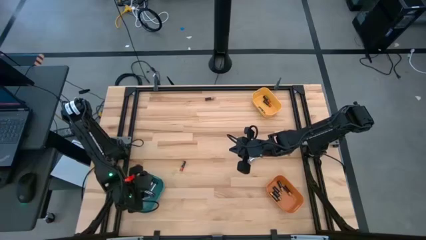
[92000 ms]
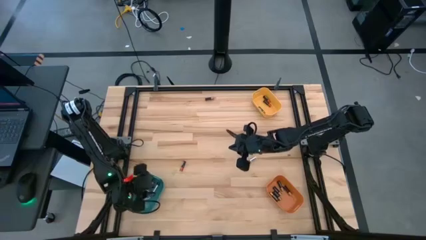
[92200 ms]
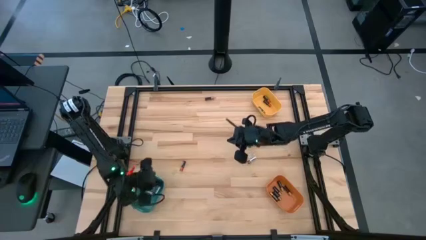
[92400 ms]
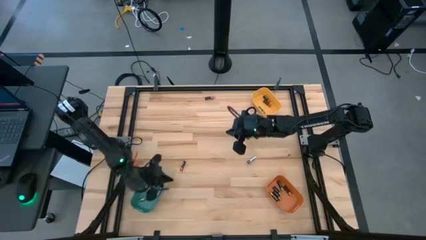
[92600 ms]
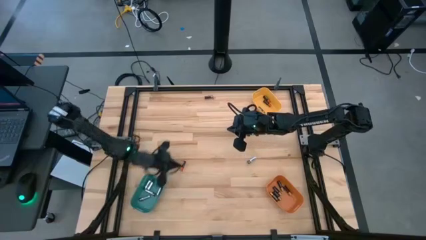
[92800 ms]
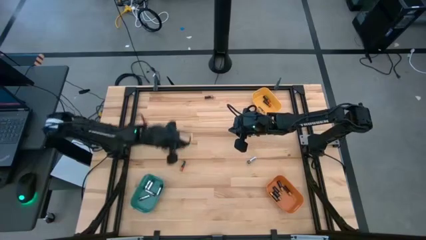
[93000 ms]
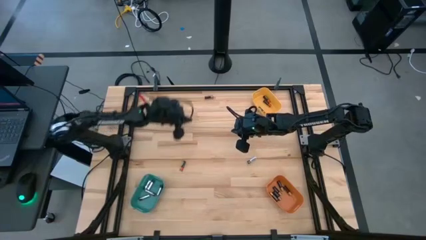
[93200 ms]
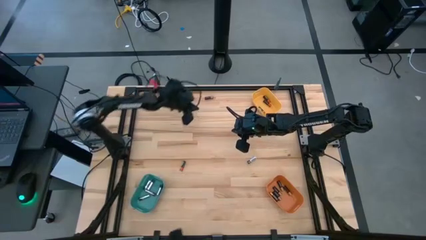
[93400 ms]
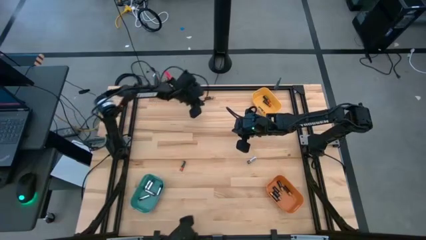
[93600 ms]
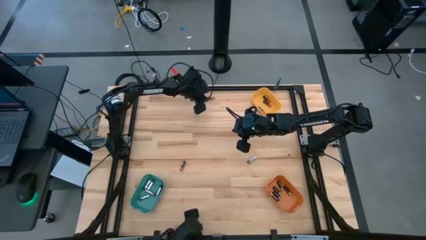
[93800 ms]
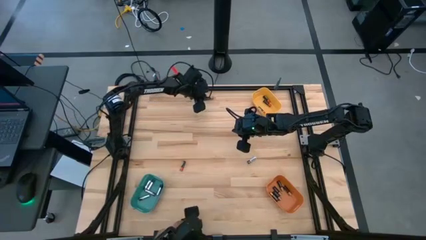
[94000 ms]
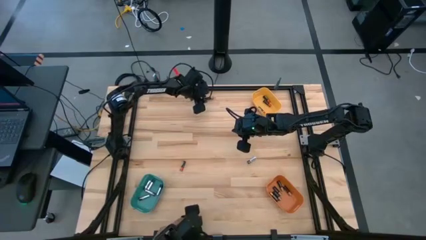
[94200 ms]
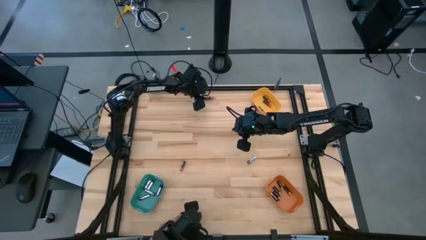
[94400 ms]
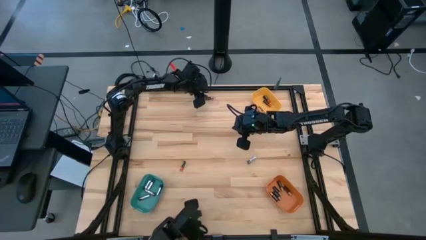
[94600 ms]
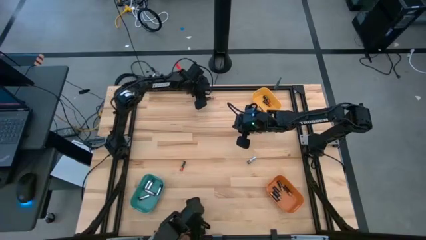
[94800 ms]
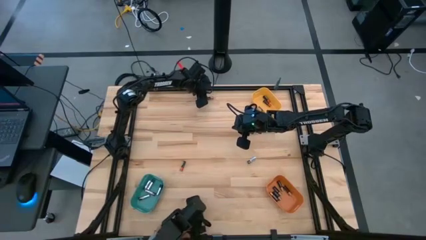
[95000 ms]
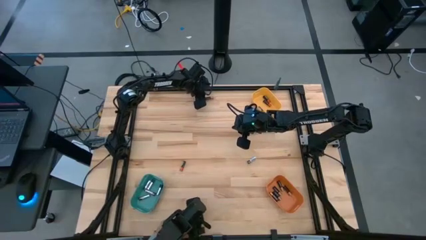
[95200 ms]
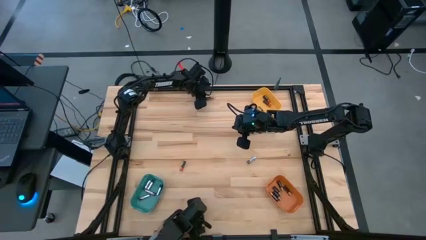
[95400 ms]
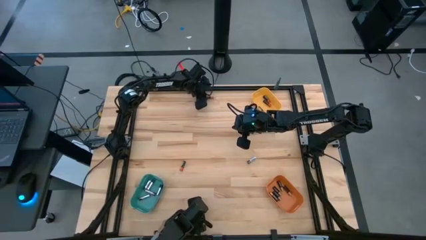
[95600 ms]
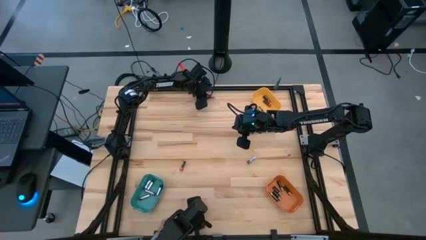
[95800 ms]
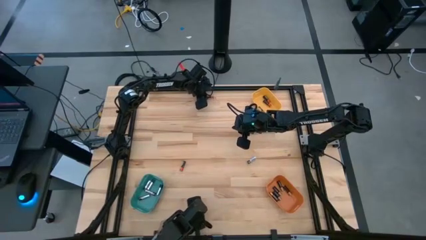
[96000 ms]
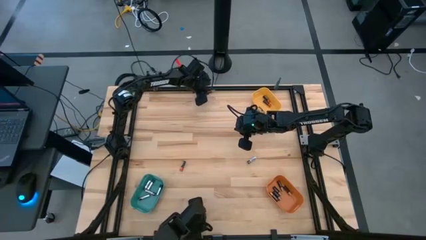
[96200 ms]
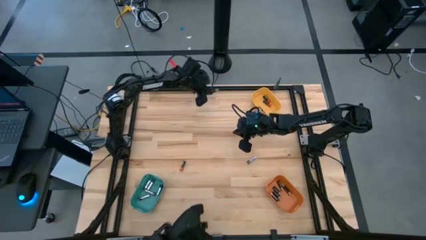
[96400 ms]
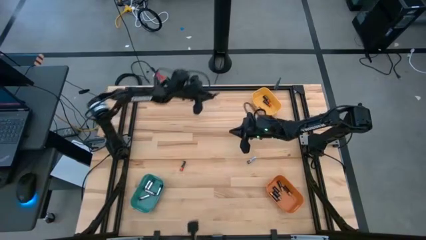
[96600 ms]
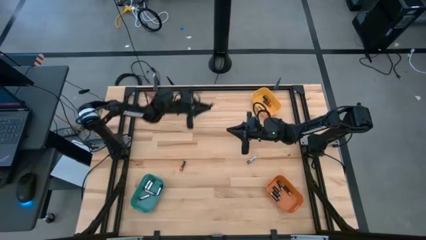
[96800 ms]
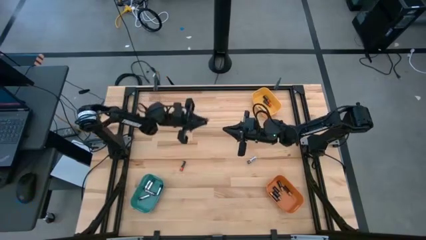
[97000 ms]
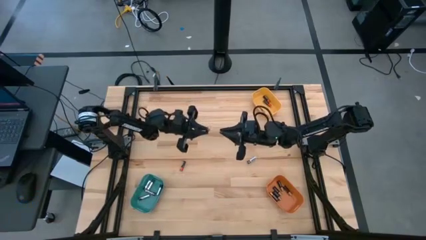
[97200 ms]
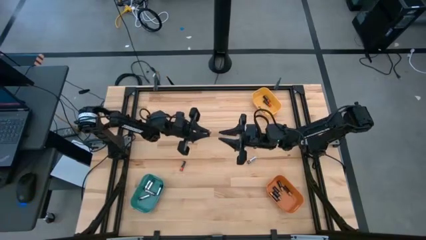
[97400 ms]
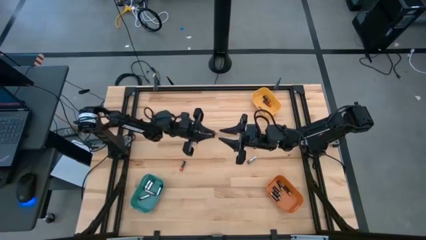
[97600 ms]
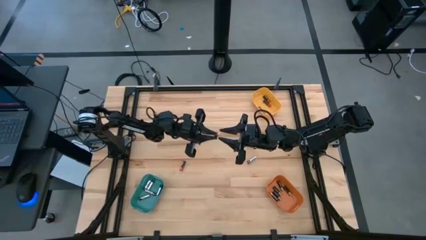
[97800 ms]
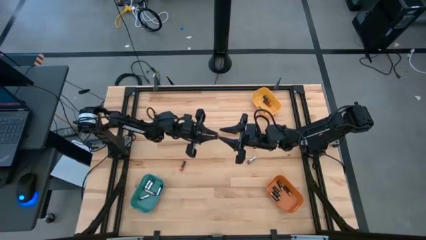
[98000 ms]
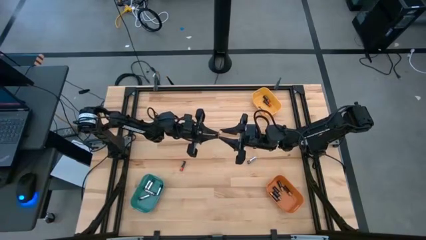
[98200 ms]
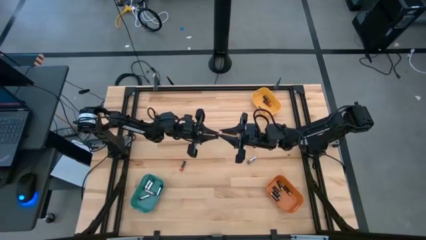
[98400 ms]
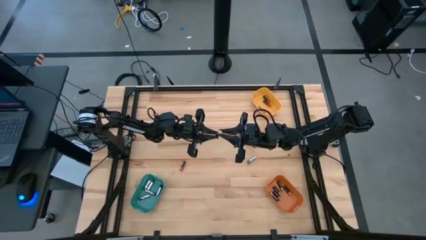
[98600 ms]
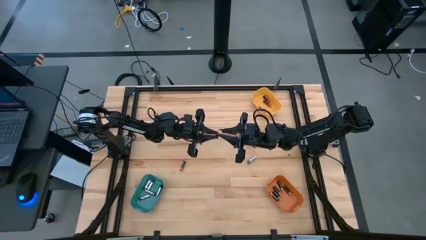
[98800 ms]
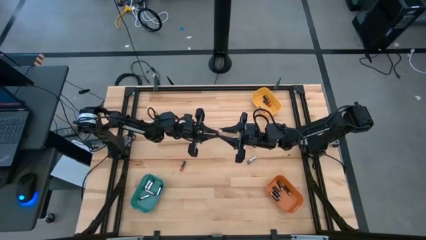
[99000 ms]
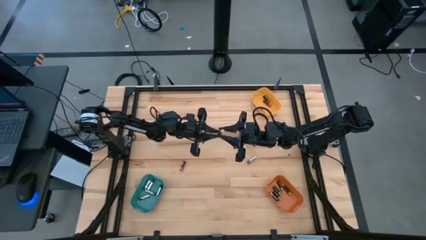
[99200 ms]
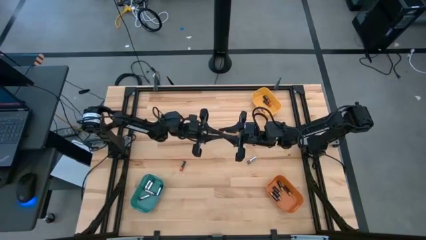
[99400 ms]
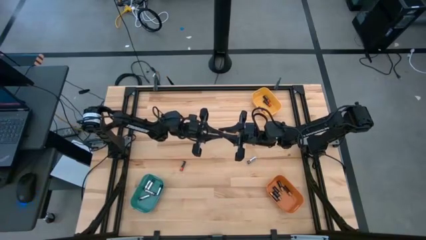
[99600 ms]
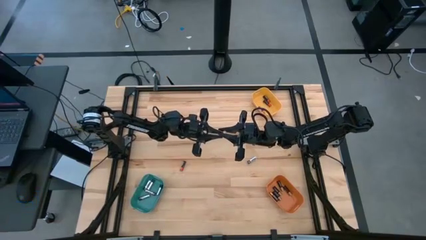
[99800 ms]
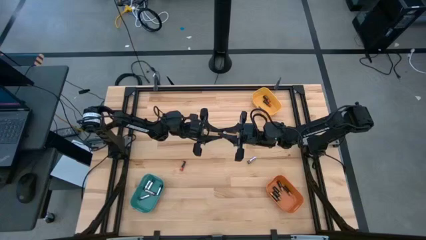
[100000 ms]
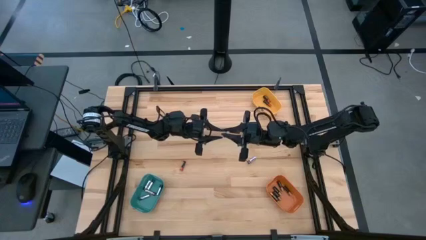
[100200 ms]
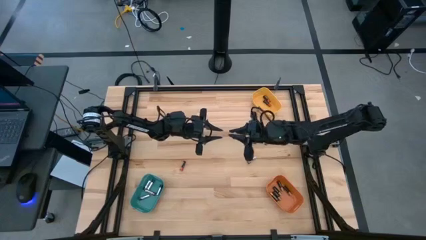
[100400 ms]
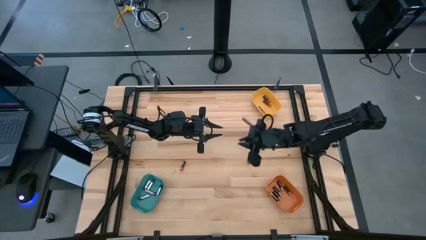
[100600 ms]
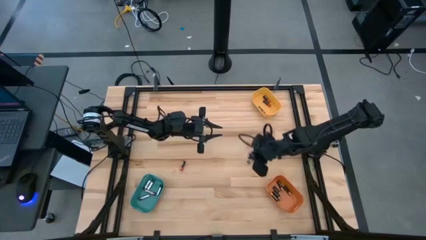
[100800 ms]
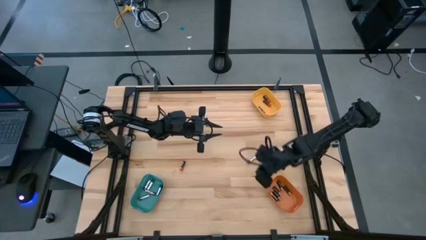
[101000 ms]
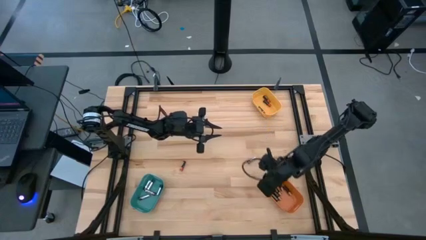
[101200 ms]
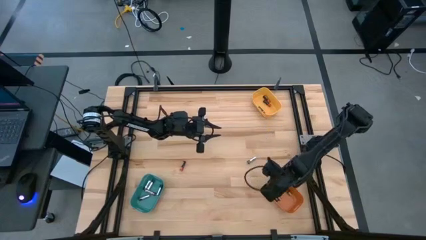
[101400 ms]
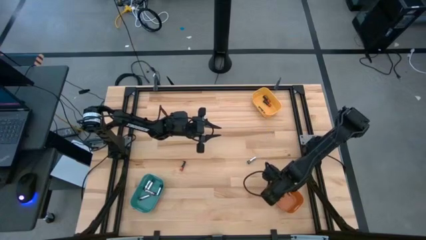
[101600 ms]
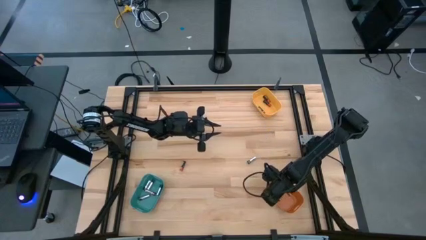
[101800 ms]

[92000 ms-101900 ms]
Task: Sort batteries
Put the brown battery into the orange bin

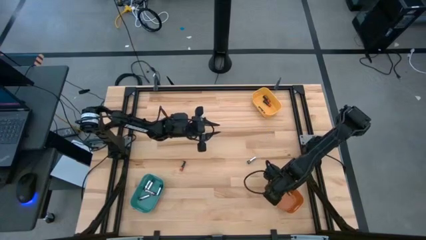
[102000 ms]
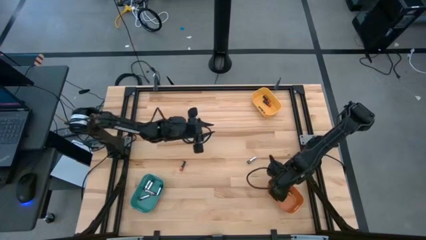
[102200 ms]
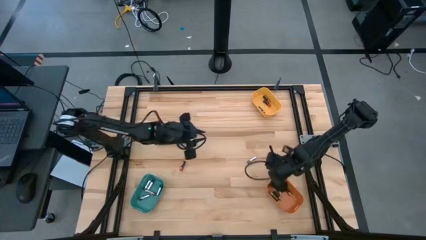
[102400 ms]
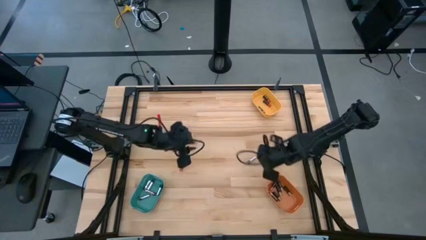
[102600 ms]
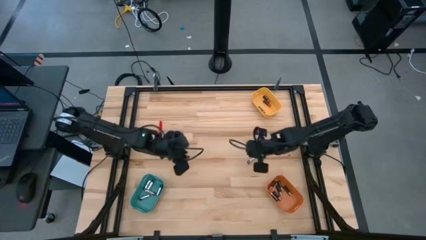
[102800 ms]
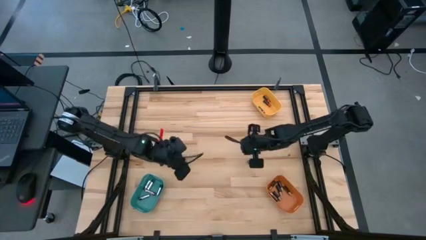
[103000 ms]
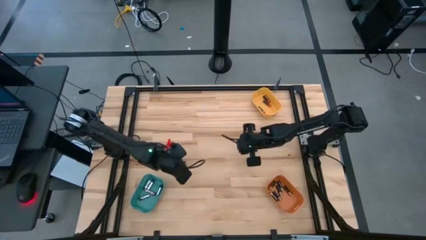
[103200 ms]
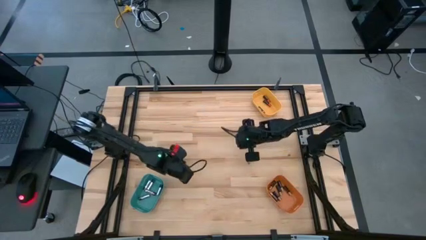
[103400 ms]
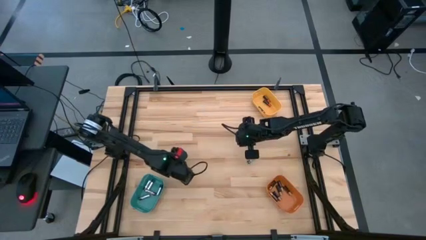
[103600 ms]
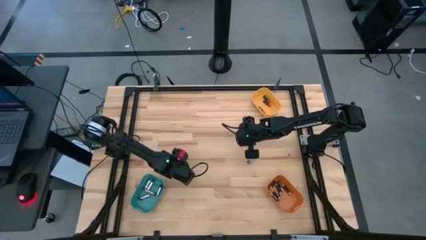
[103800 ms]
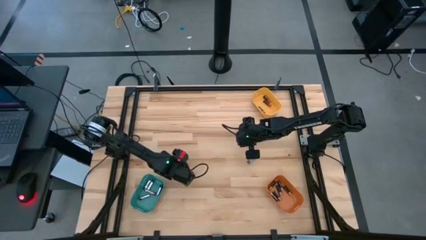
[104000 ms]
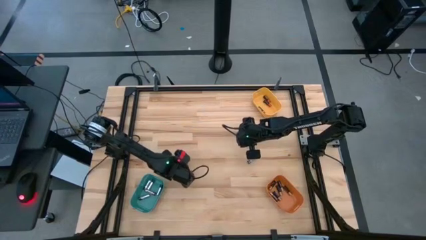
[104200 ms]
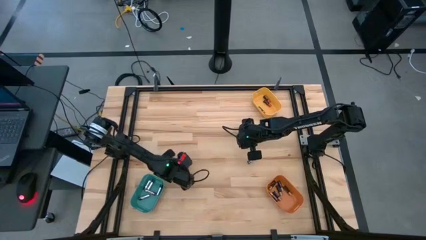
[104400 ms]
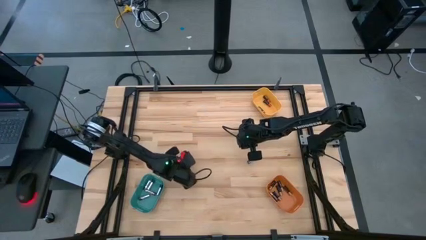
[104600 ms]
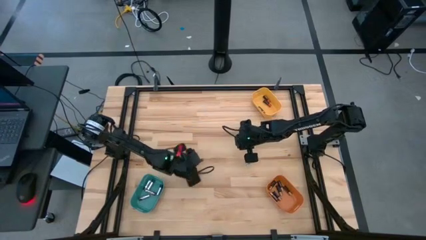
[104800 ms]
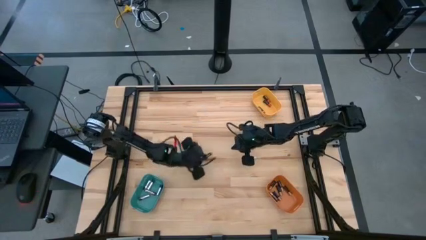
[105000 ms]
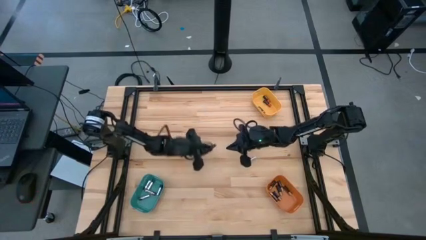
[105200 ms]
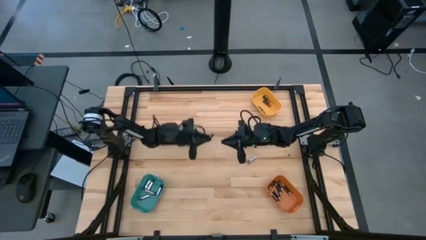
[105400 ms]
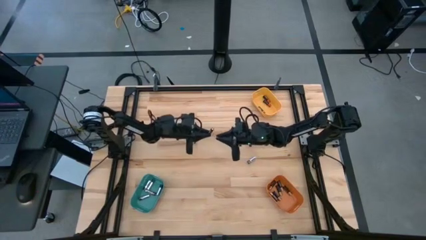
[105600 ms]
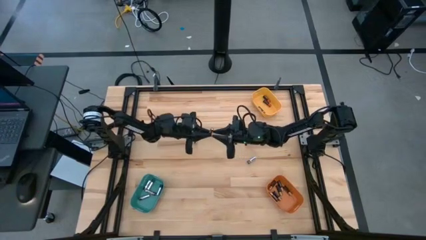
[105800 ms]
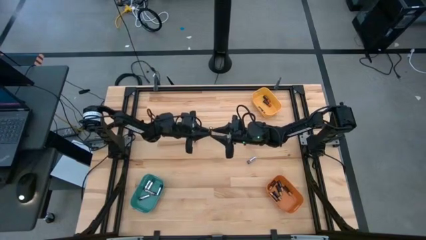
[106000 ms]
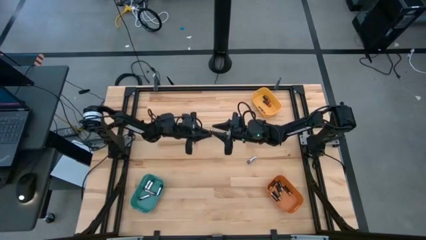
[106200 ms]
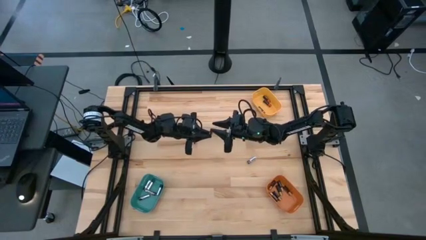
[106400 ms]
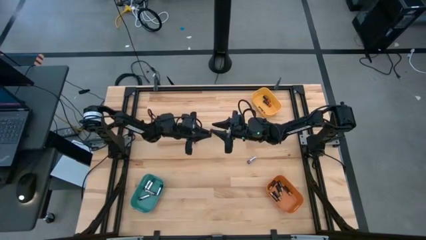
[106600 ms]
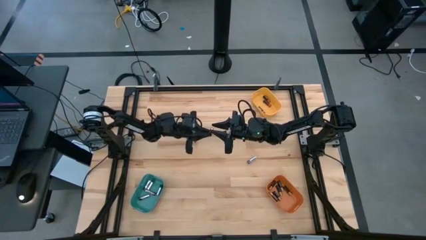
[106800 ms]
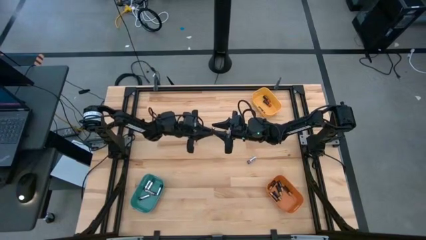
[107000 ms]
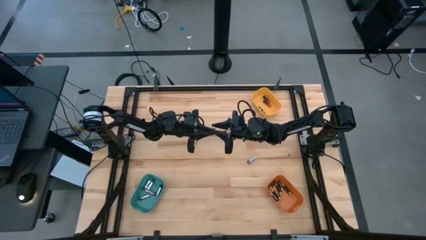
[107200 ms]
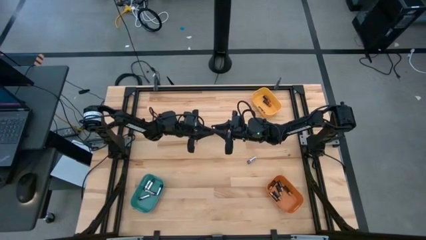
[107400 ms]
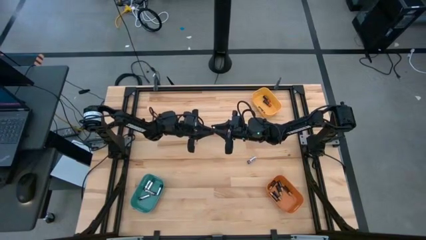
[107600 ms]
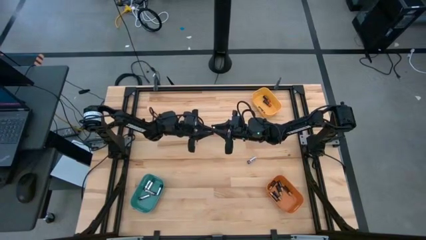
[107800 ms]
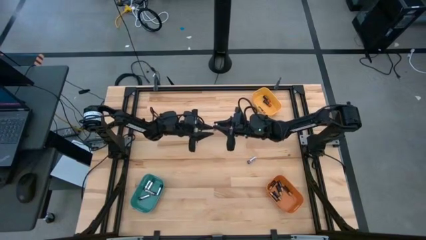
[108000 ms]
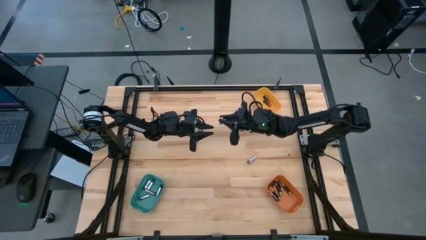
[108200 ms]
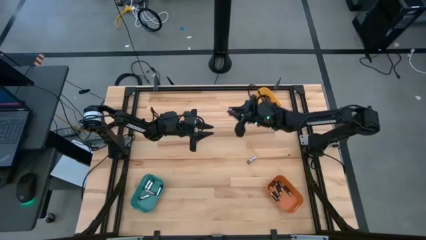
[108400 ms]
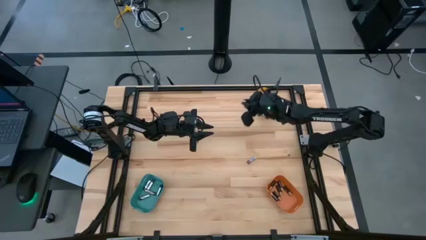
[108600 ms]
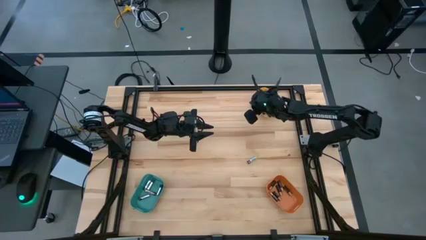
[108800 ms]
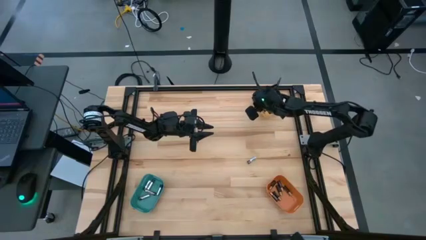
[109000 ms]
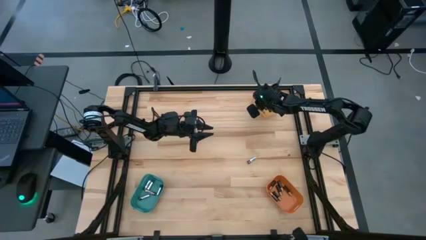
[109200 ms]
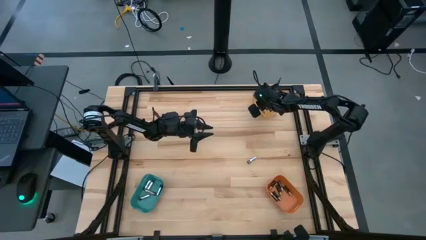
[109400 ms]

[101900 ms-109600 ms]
Put the red battery into the yellow bin
